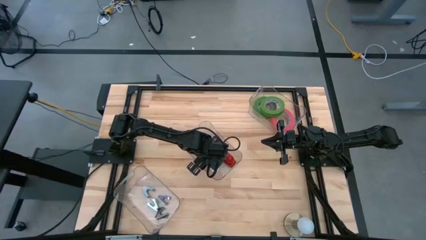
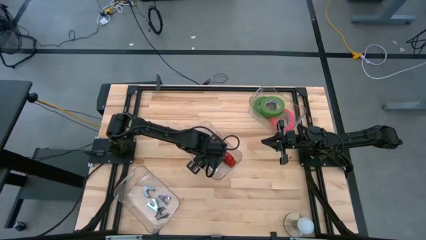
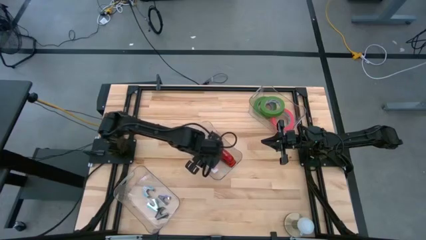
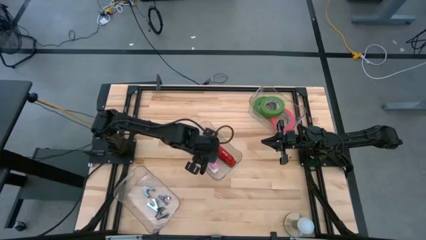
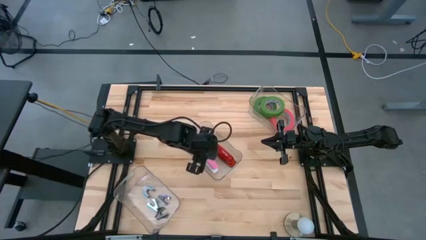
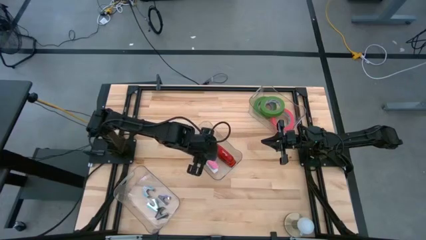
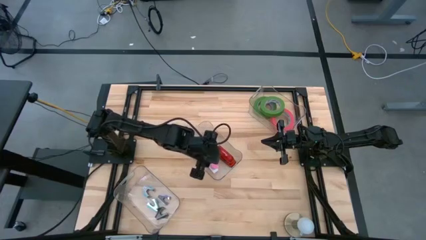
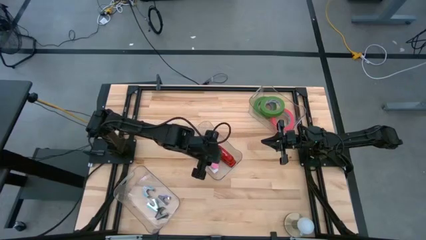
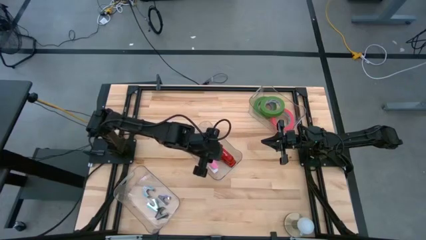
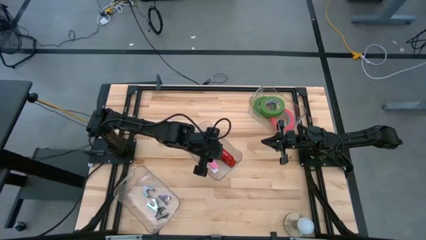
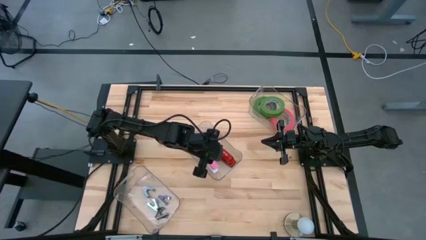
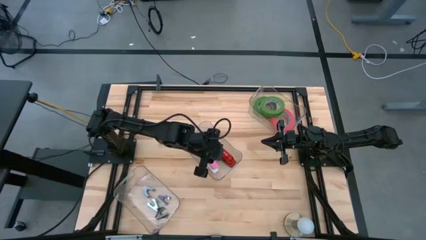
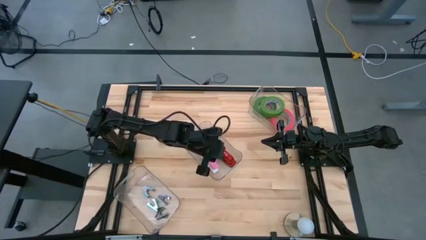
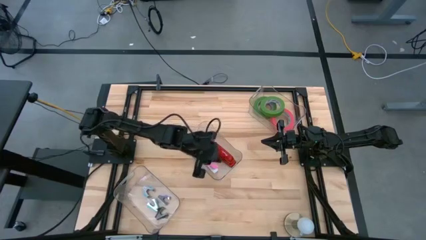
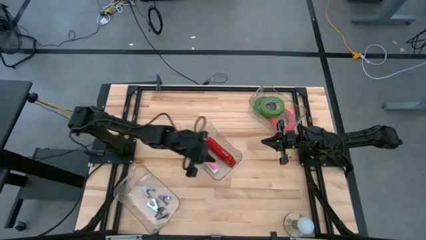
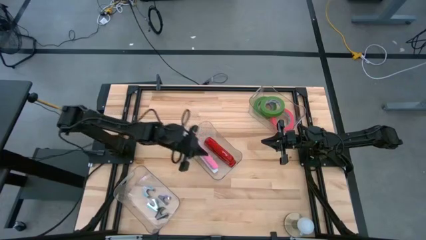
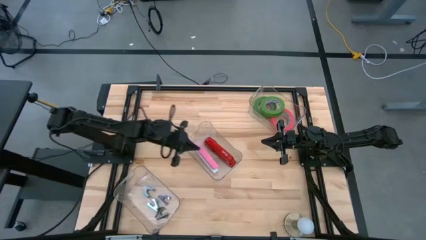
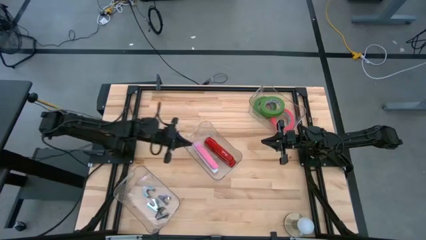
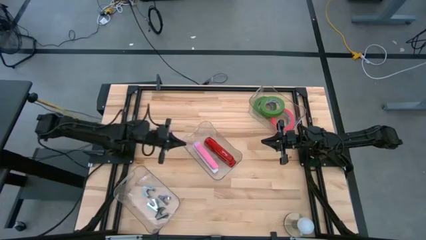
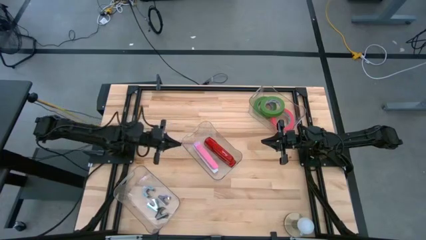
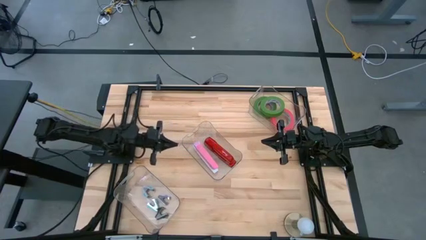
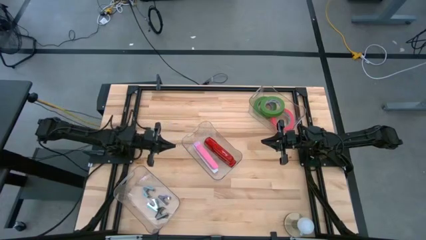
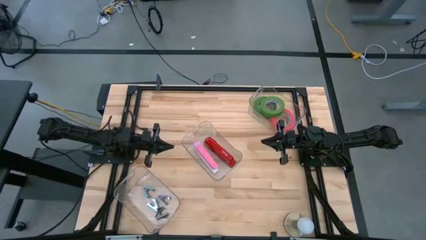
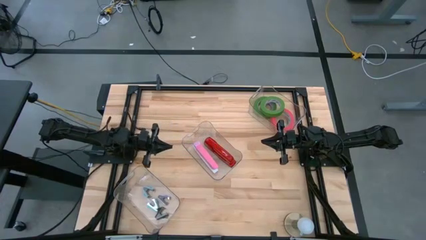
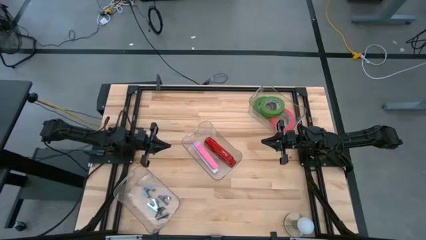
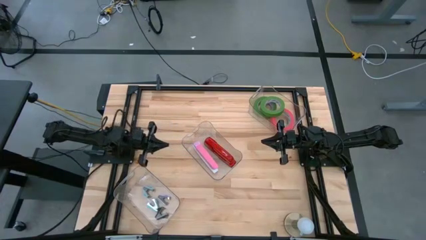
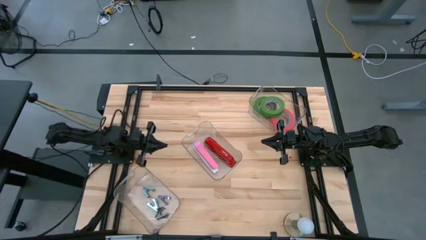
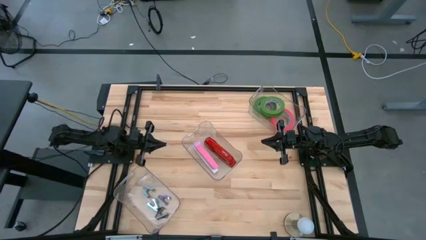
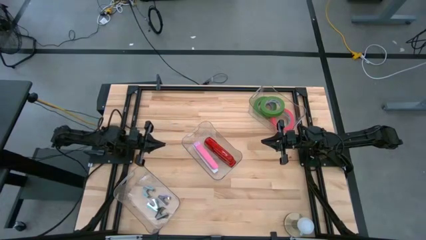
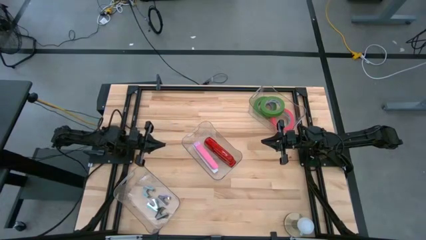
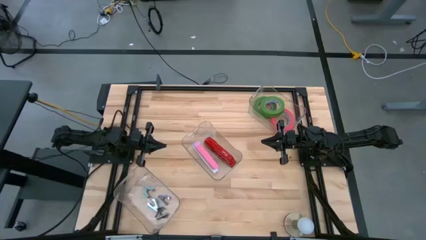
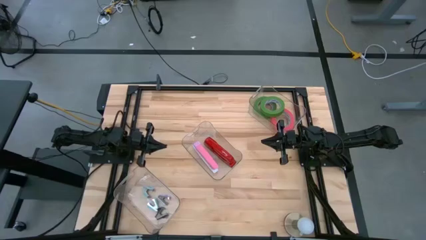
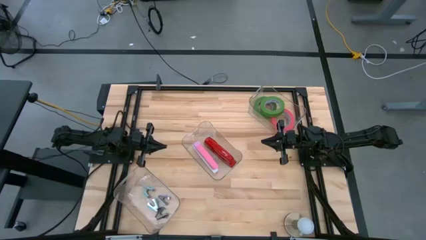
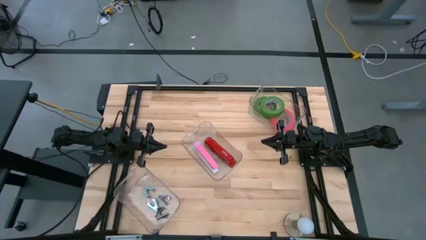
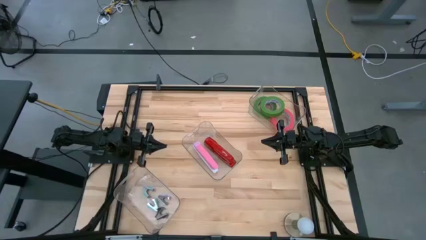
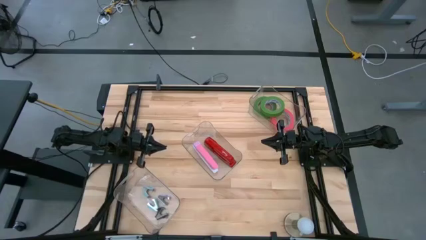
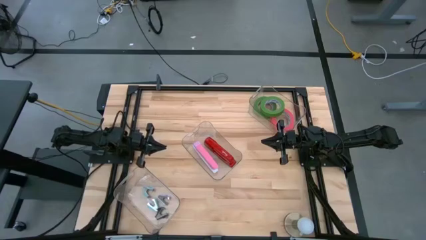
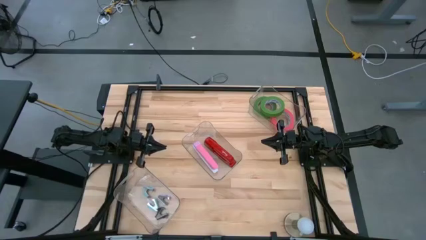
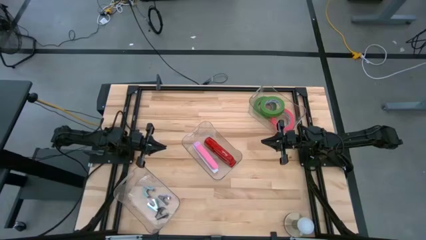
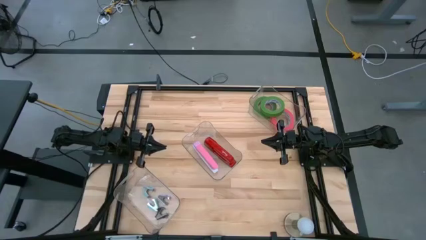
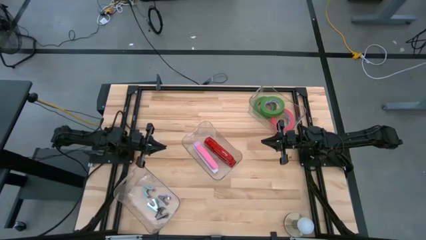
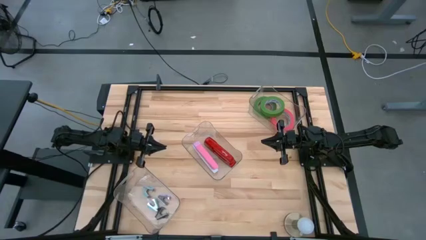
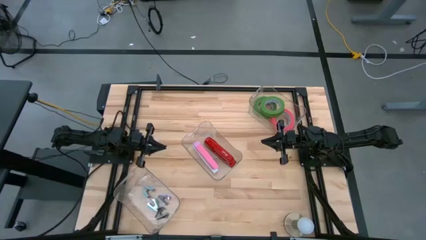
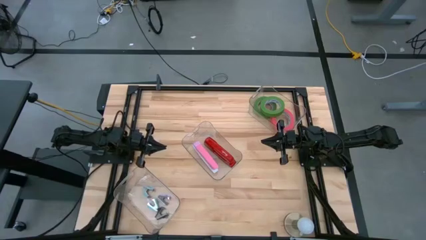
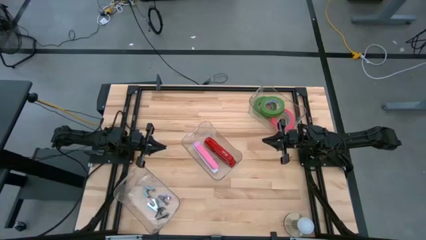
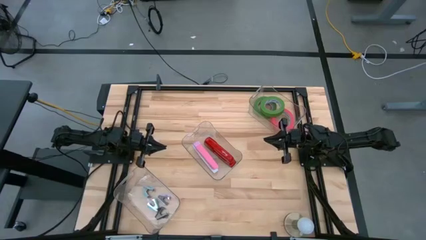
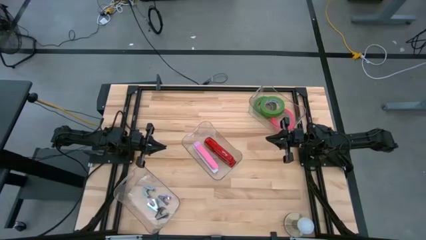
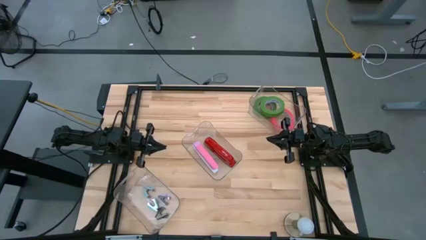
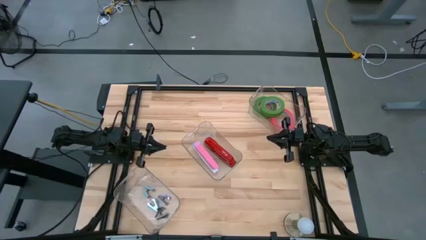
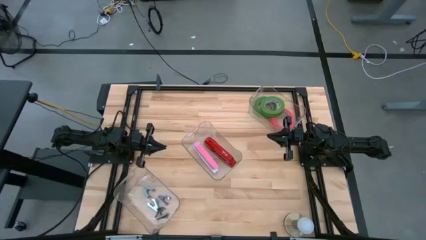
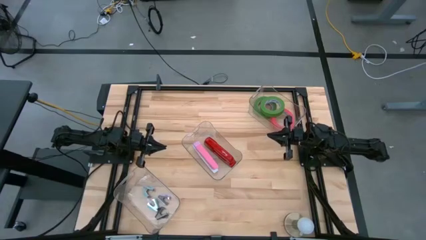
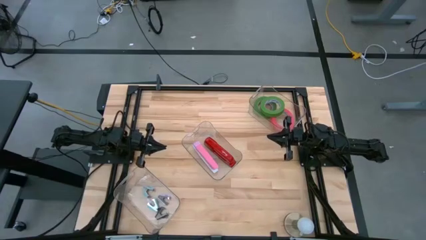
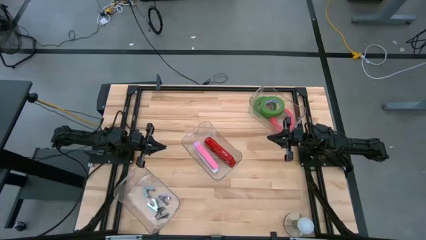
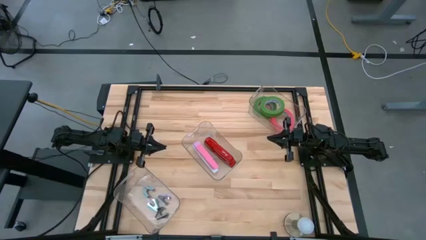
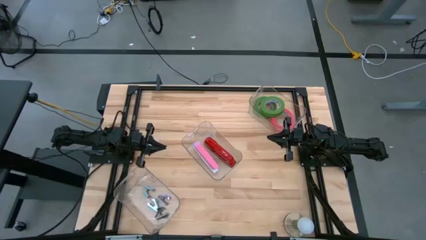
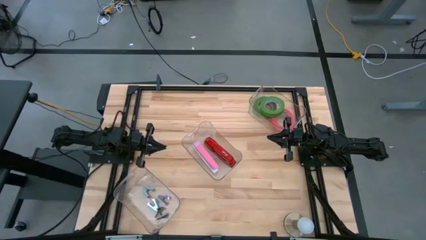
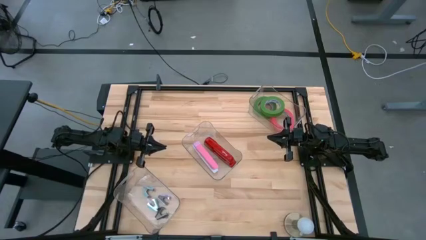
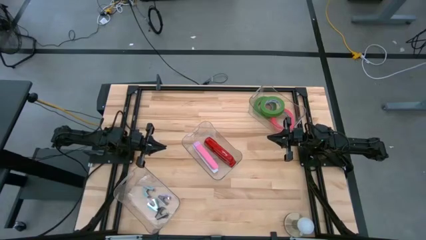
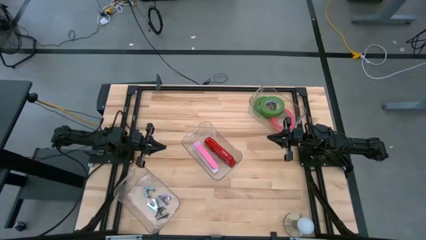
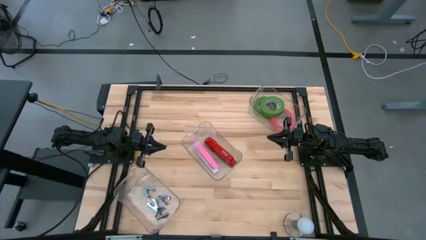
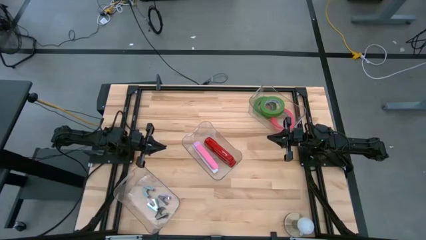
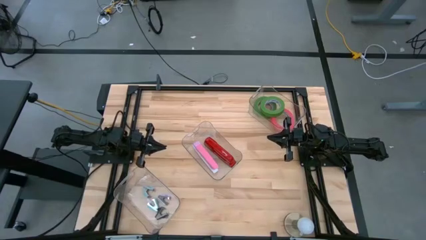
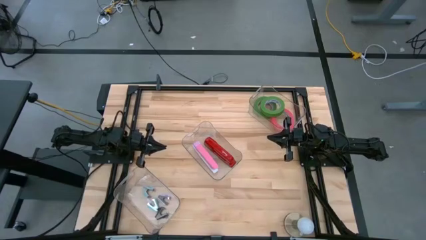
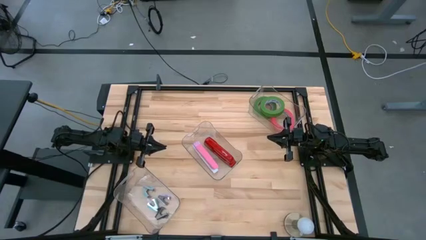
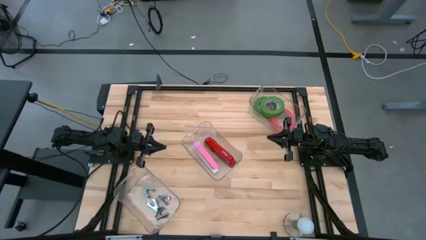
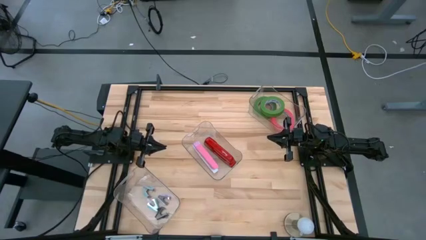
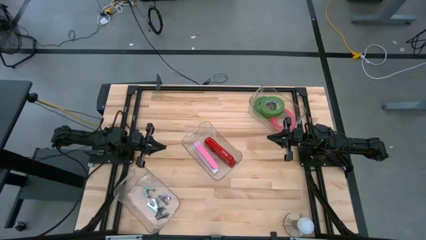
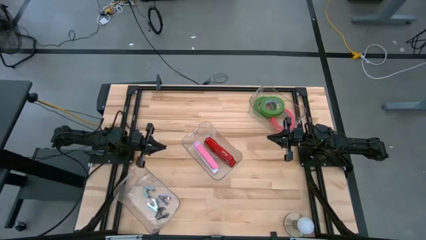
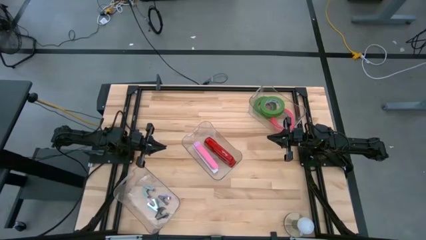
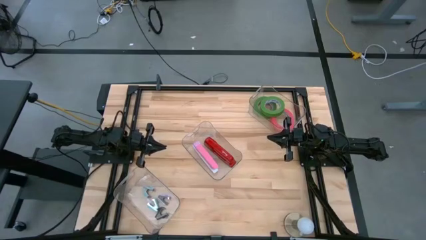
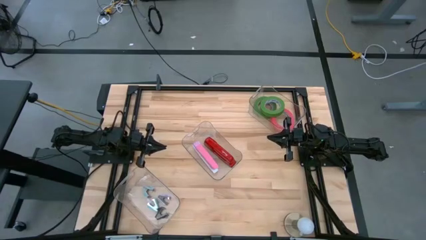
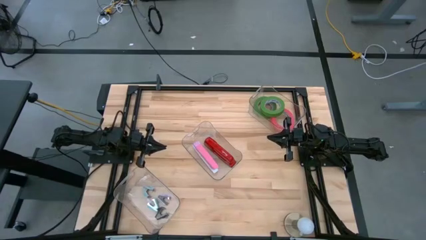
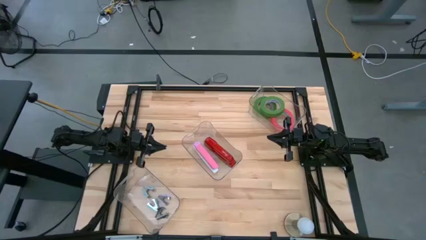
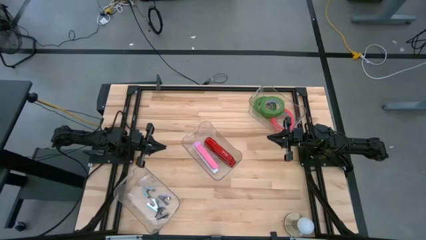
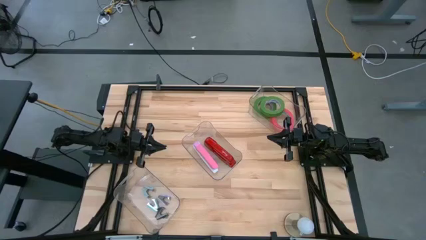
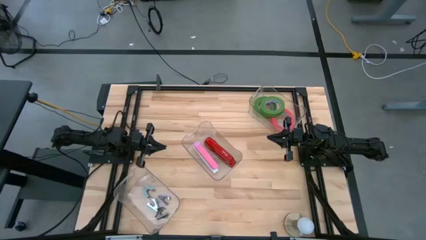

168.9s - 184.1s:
Task: Pick and place Stapler, Stapler remover, tape
Return to Home Position

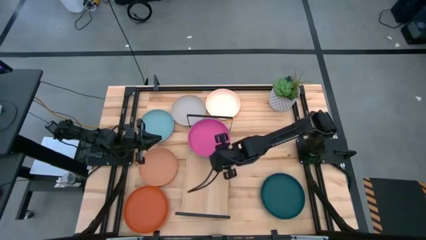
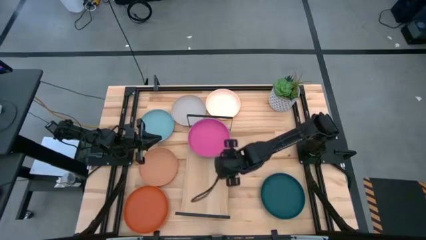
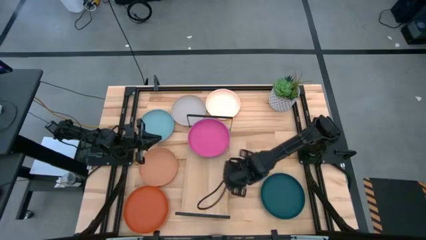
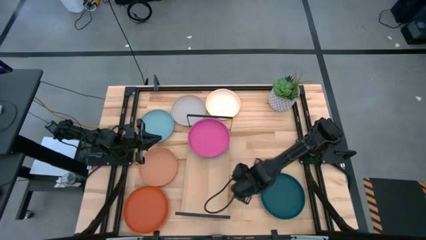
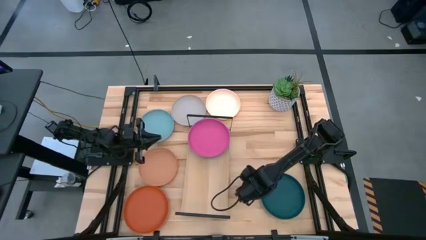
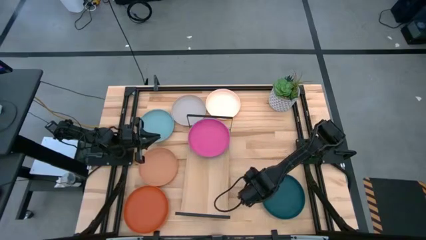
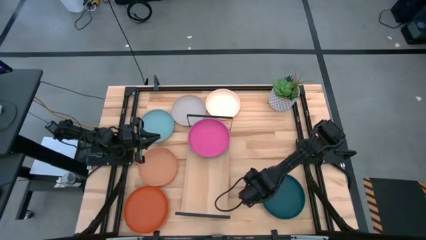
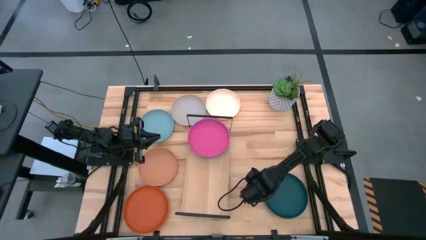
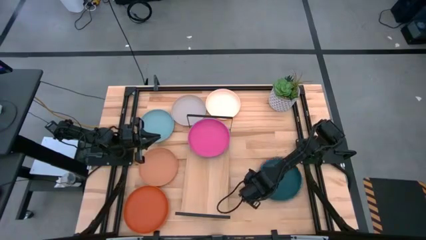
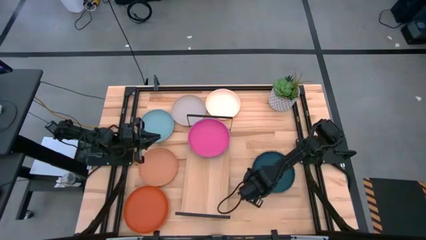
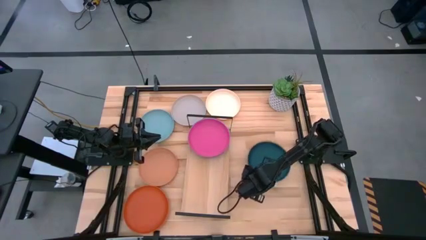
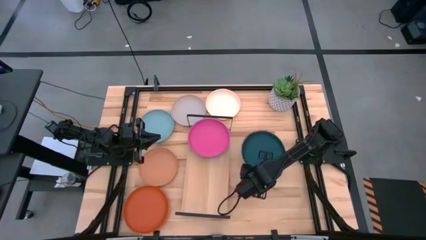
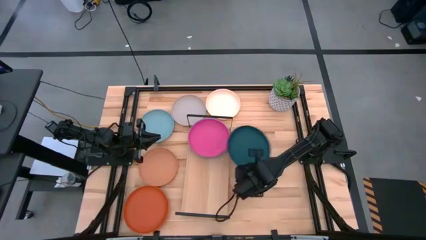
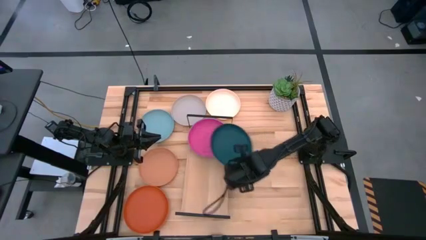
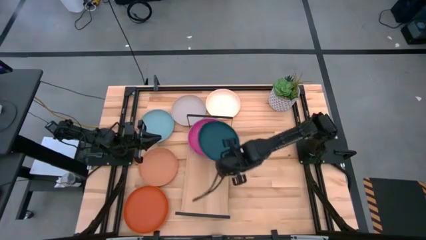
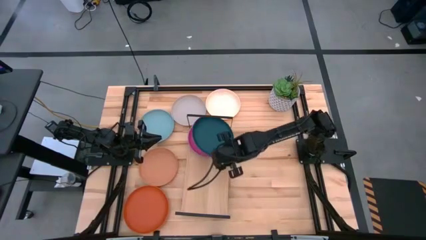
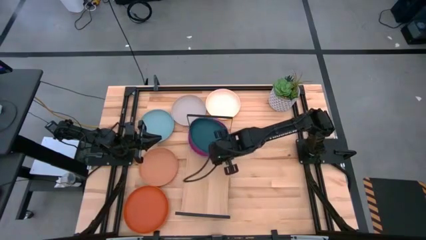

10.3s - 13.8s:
Task: Place and stack plates onto a shelf
Stack the dark green plate on top of the the pink plate on the shelf
